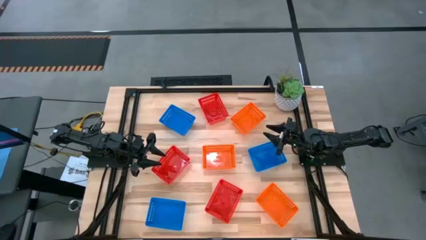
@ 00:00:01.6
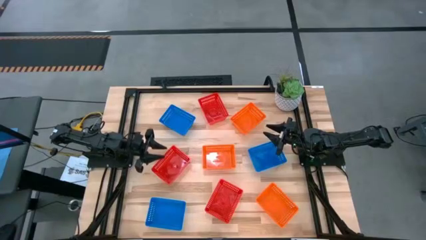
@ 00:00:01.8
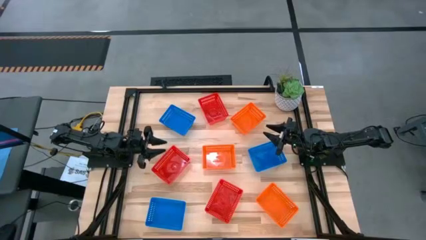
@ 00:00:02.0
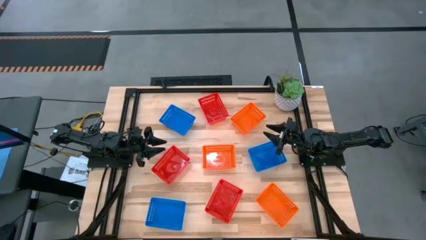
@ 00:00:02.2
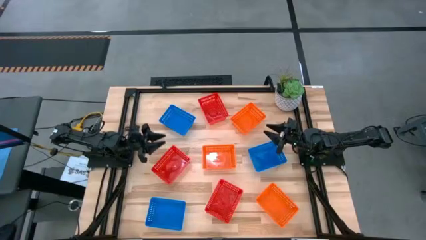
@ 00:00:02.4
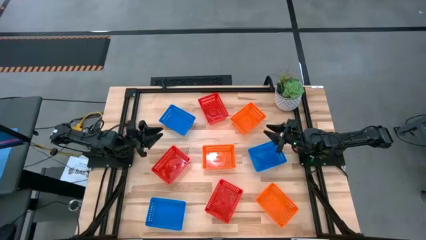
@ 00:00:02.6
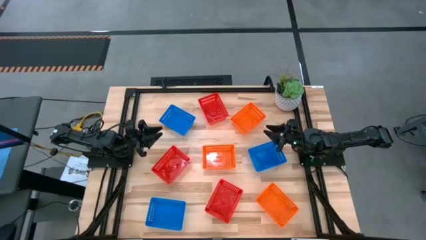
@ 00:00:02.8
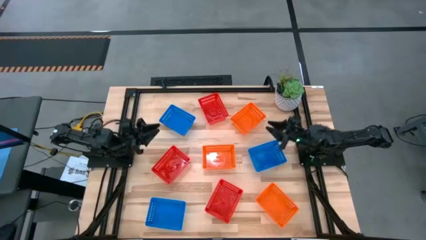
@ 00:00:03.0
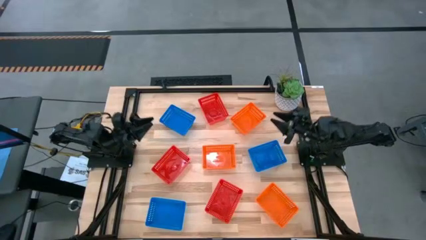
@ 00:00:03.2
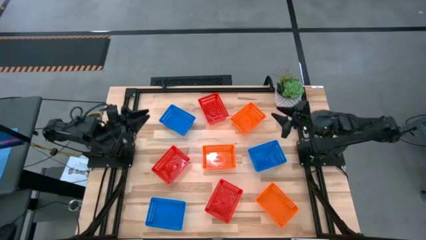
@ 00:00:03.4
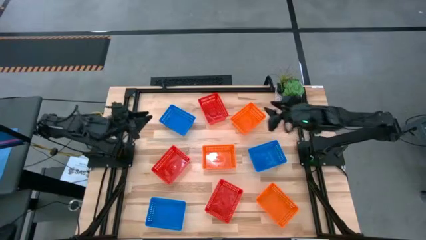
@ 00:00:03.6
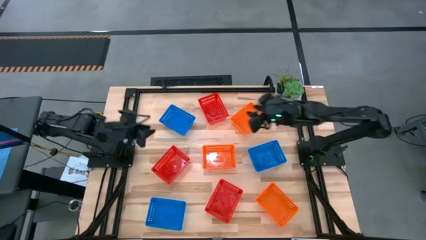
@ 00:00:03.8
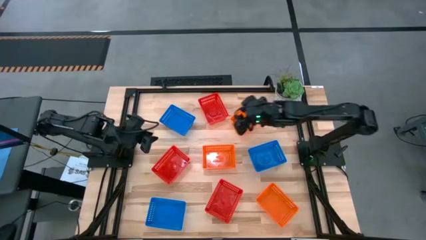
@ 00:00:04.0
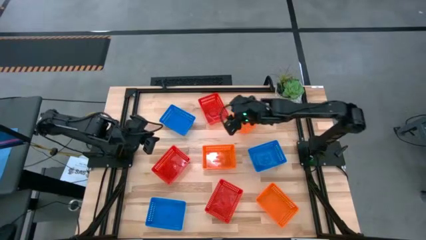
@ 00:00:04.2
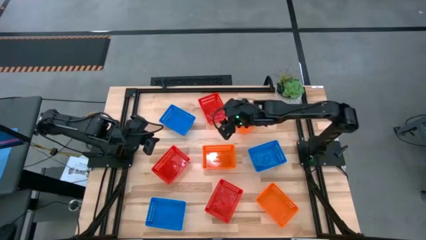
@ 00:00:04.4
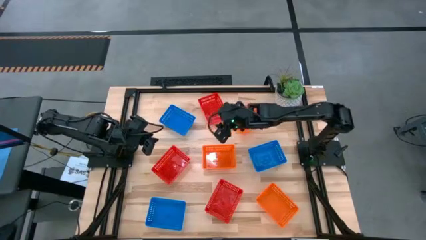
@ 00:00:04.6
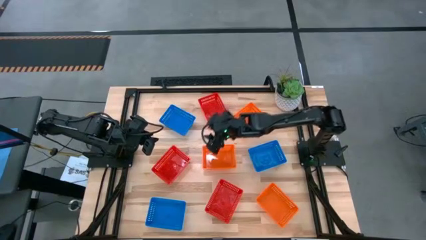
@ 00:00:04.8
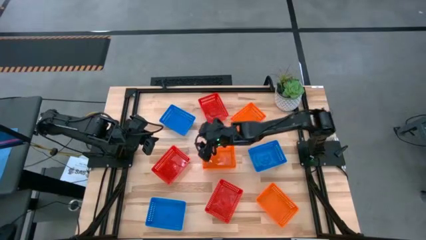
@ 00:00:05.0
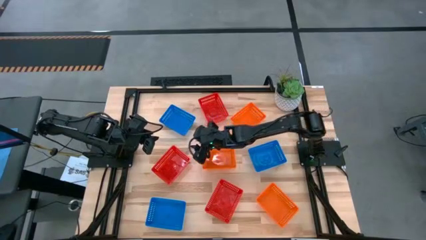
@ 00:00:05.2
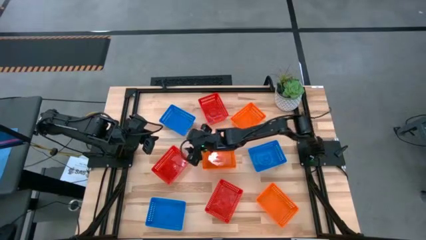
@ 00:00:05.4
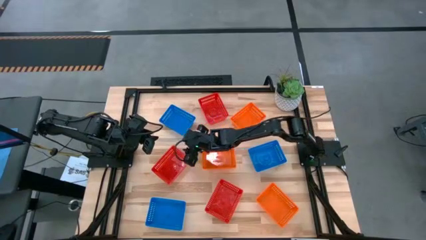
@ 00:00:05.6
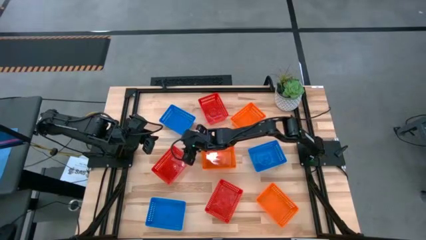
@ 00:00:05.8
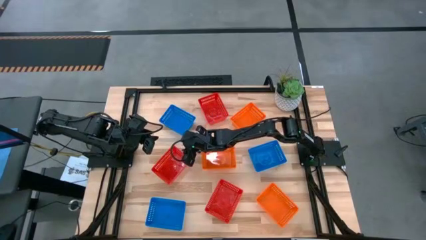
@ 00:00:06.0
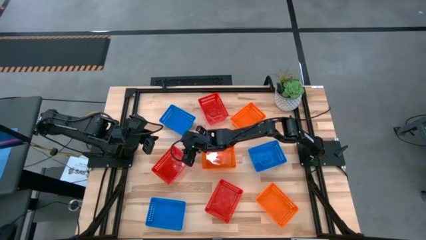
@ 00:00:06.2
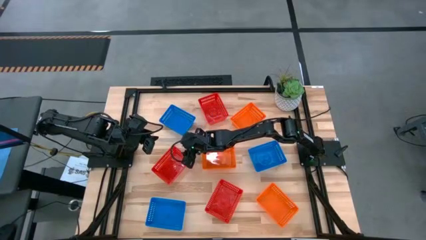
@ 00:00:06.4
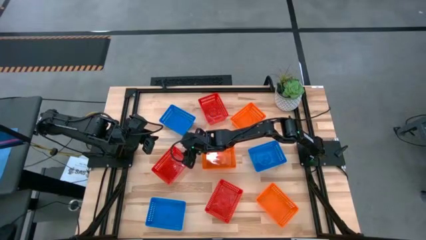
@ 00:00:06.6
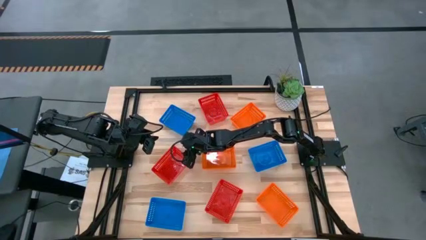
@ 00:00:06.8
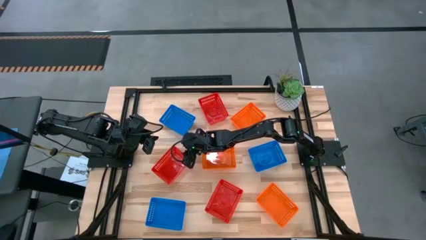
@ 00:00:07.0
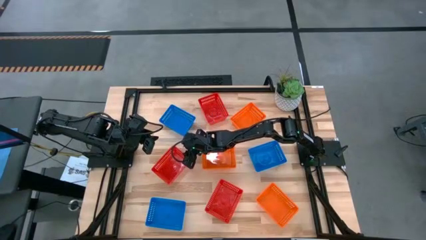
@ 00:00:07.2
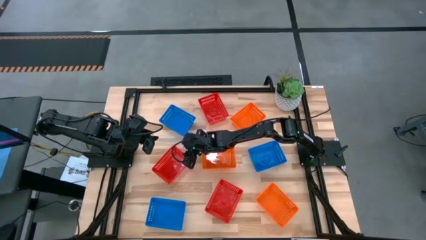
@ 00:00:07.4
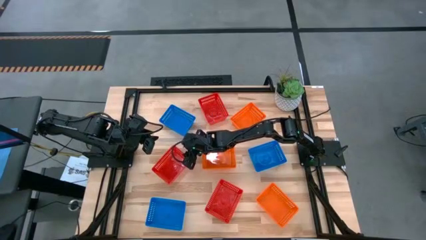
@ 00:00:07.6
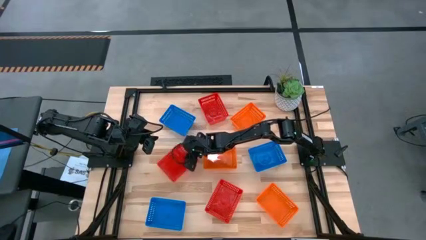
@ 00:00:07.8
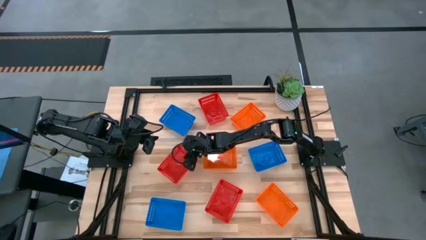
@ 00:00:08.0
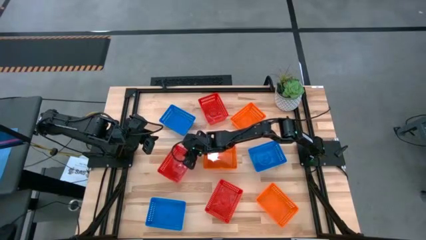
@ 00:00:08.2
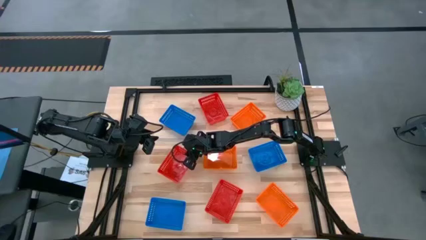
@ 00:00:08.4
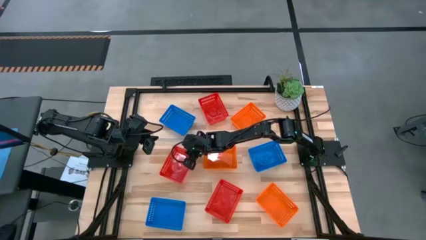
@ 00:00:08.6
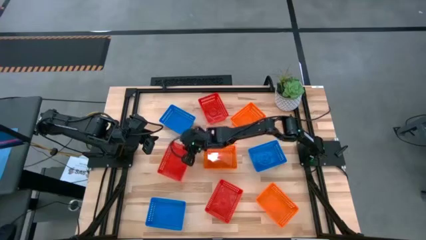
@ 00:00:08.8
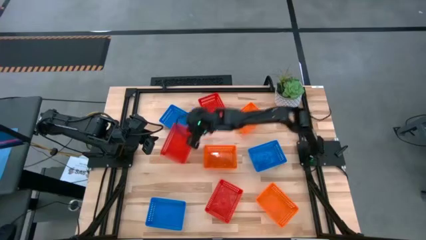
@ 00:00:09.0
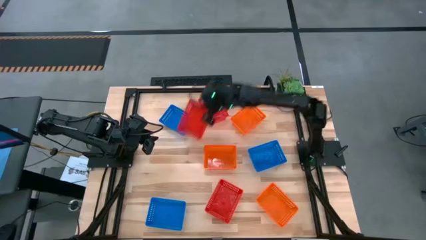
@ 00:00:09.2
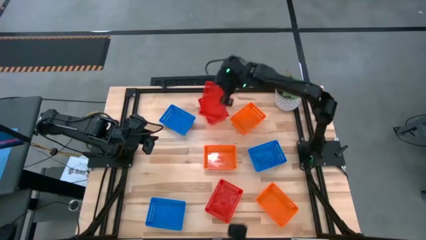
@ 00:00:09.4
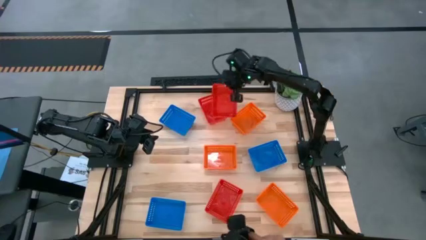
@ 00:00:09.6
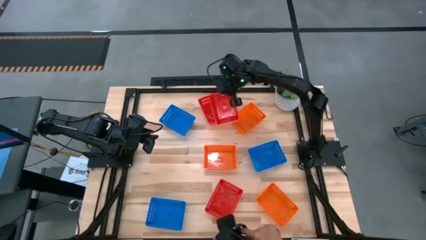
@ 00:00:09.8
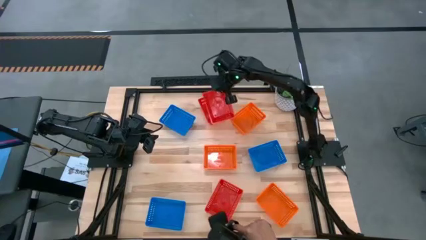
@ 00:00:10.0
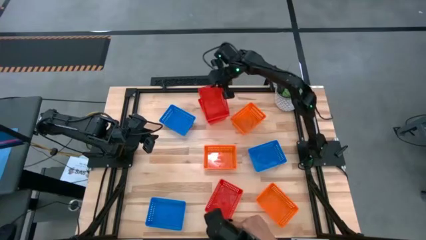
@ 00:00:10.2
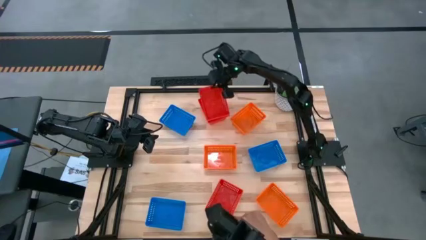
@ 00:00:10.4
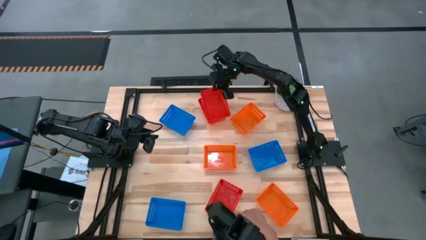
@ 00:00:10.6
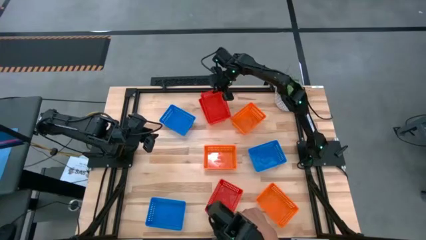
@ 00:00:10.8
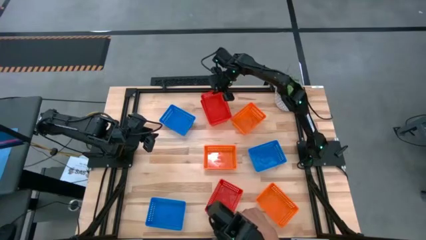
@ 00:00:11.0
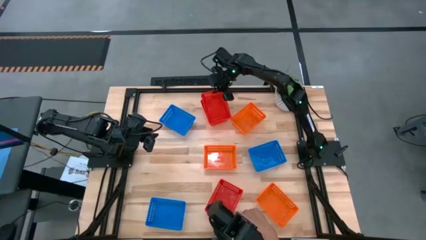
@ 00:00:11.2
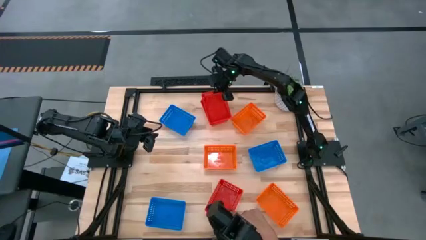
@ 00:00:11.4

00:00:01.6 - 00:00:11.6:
Stack the middle red bin on the top red bin

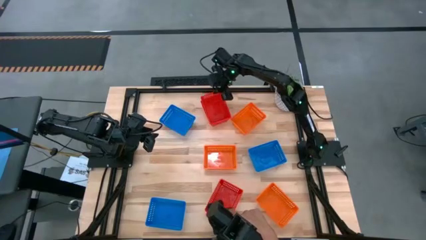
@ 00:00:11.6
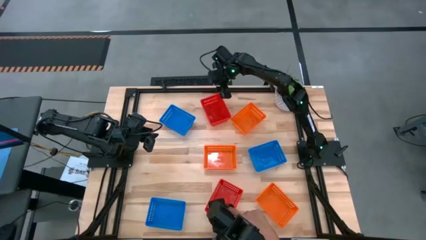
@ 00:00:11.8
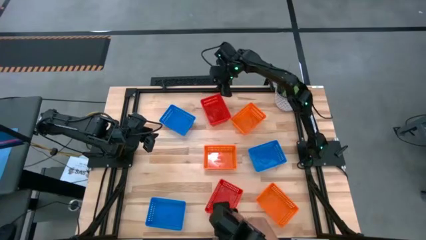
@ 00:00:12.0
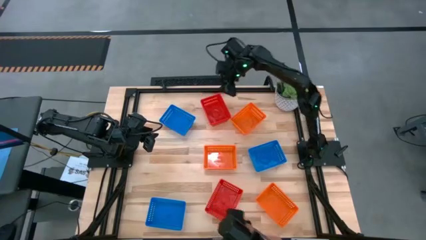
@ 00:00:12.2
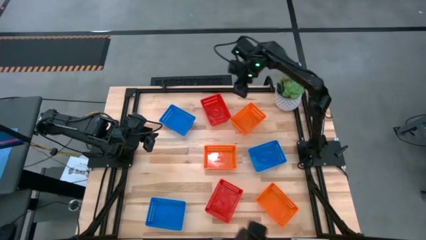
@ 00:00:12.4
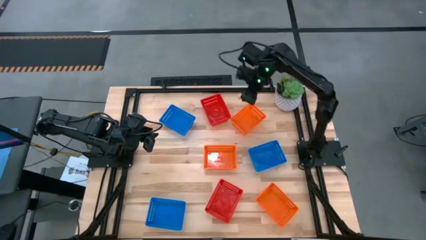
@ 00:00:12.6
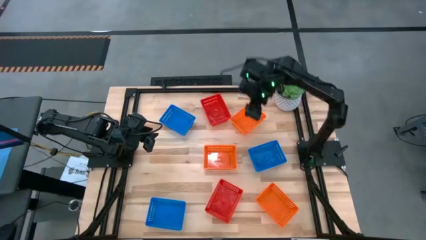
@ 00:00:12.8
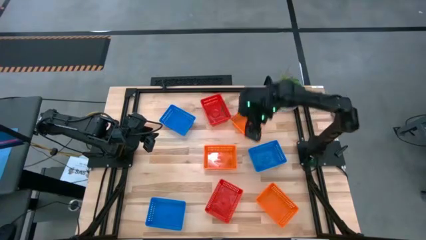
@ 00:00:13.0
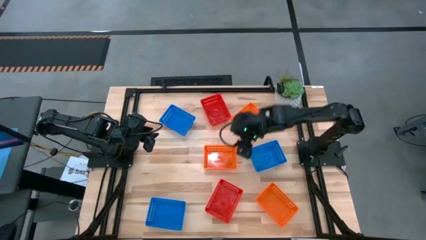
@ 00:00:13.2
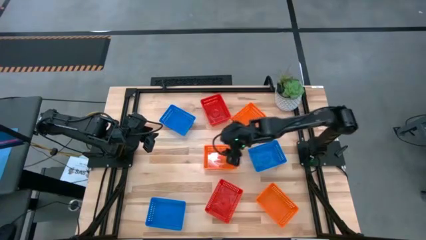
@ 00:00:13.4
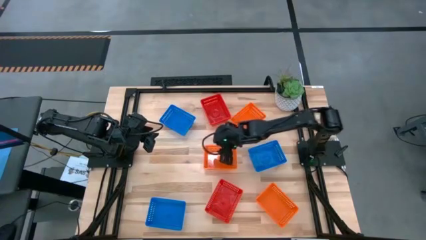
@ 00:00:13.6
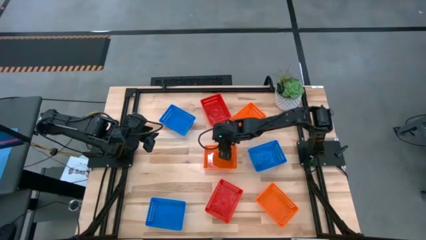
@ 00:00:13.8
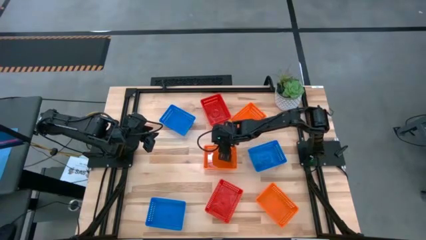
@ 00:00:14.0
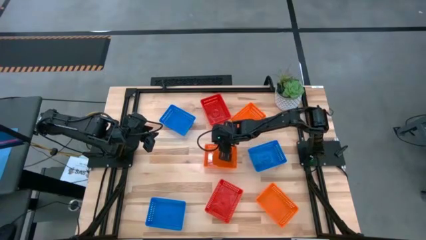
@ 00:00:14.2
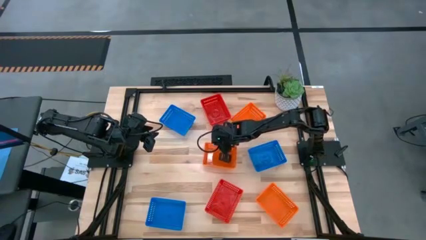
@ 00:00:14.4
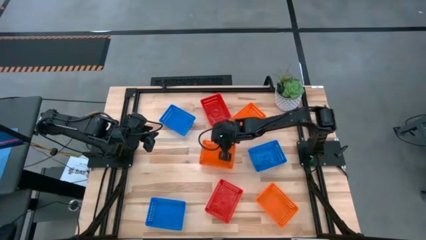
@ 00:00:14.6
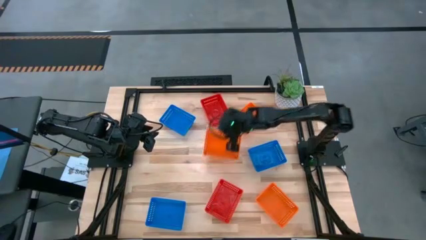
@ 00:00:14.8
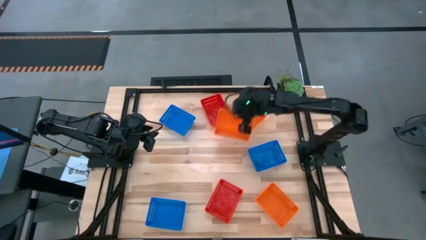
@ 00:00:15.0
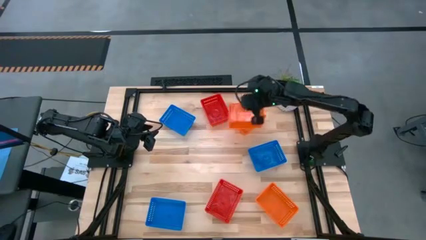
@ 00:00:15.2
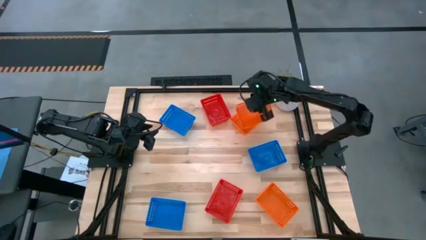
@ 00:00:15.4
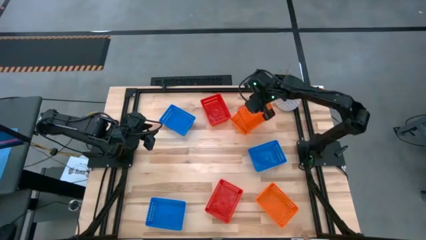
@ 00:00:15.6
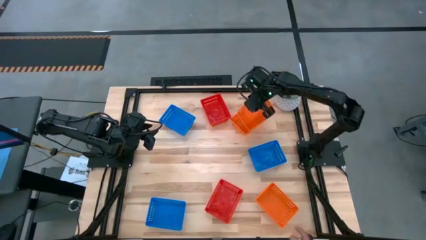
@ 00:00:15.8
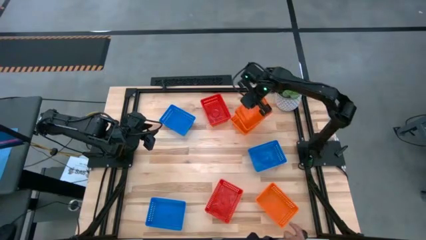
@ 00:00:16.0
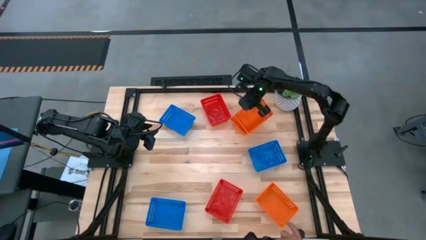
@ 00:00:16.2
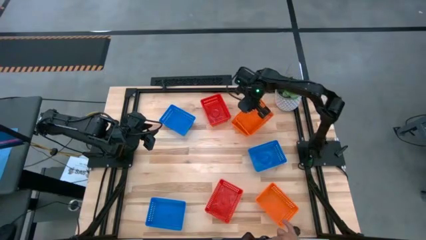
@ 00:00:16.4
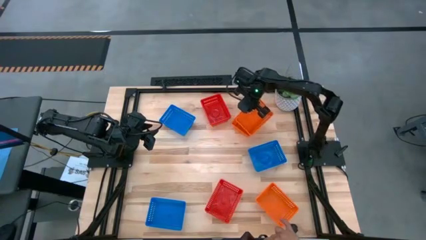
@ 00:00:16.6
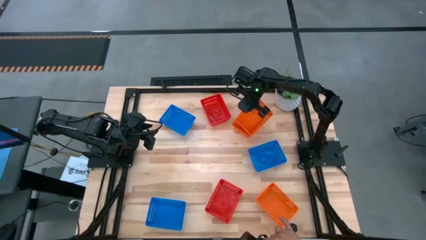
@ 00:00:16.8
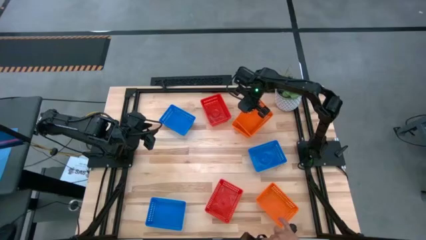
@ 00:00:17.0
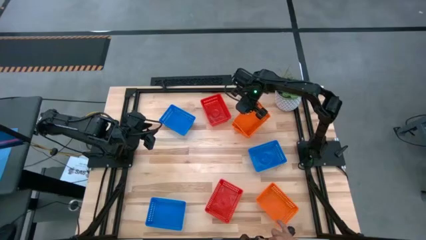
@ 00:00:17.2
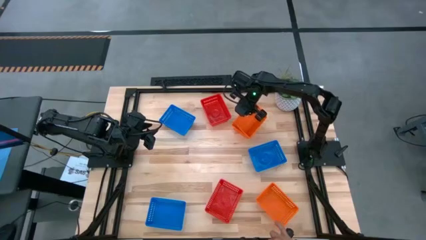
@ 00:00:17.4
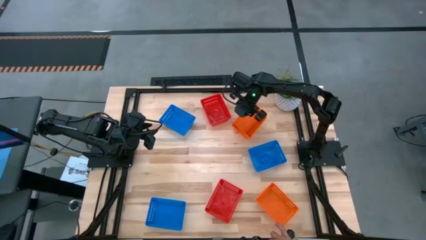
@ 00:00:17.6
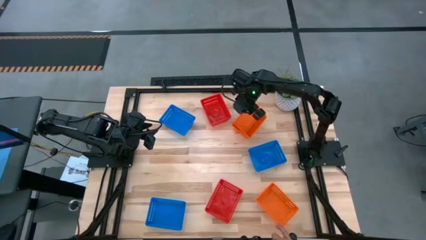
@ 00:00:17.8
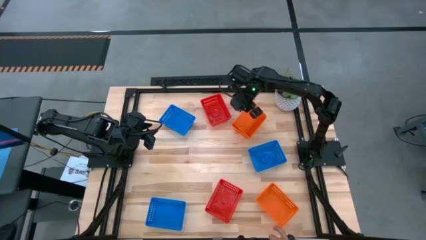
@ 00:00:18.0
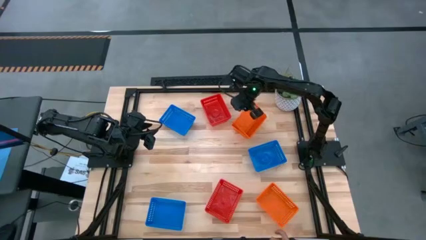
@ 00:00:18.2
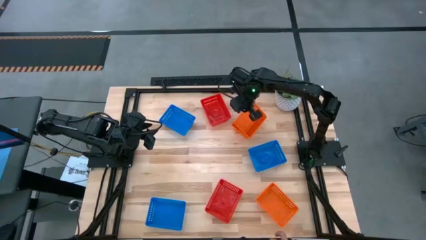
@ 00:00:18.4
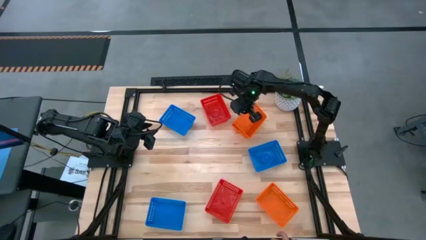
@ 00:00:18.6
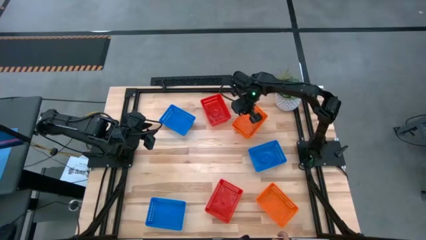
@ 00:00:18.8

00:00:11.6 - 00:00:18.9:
Stack the middle orange bin on the top orange bin
